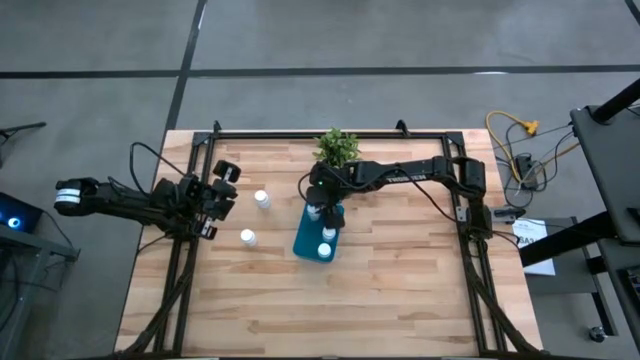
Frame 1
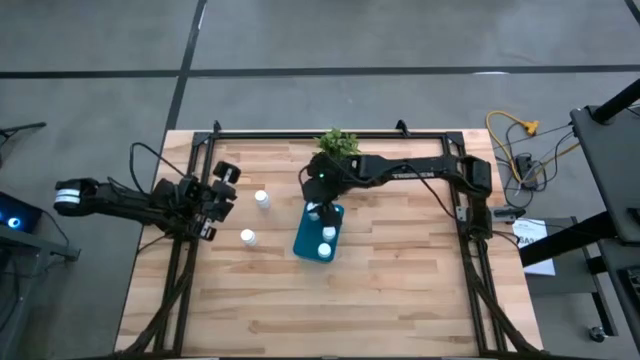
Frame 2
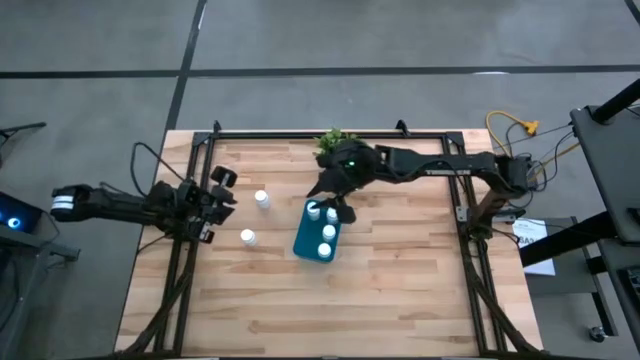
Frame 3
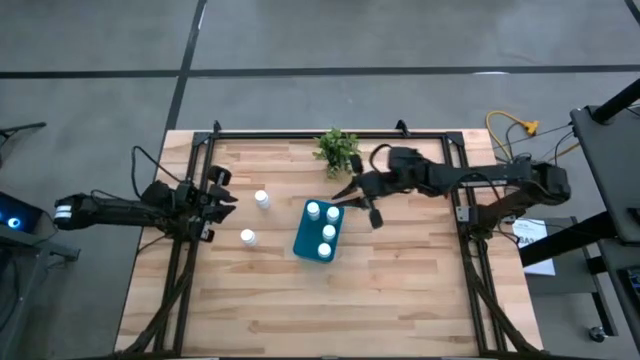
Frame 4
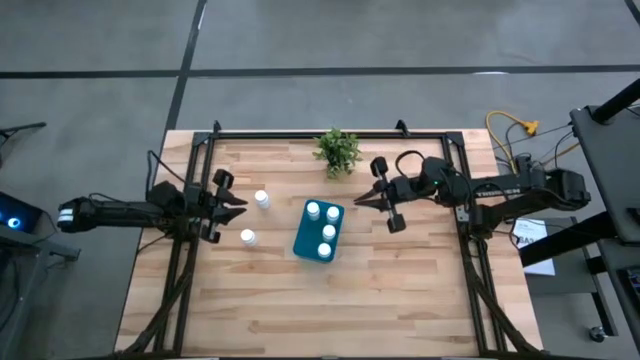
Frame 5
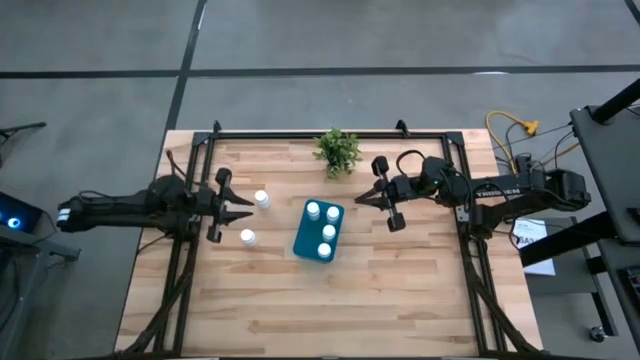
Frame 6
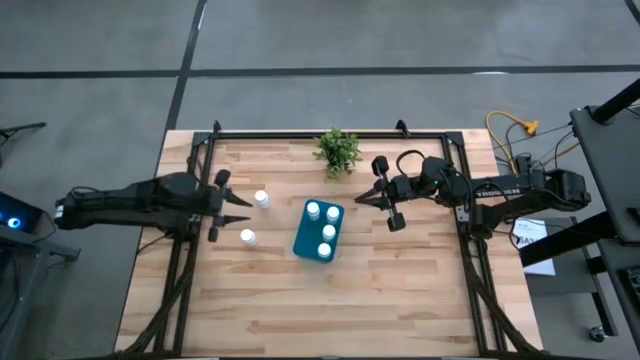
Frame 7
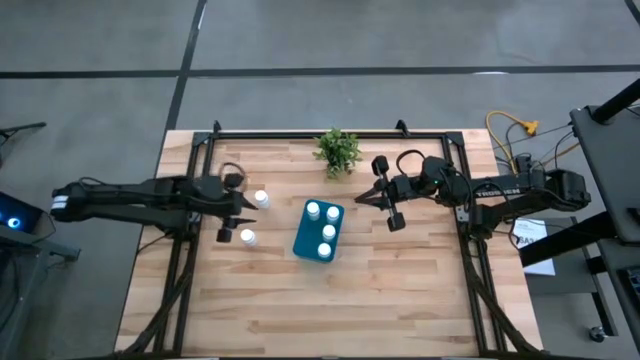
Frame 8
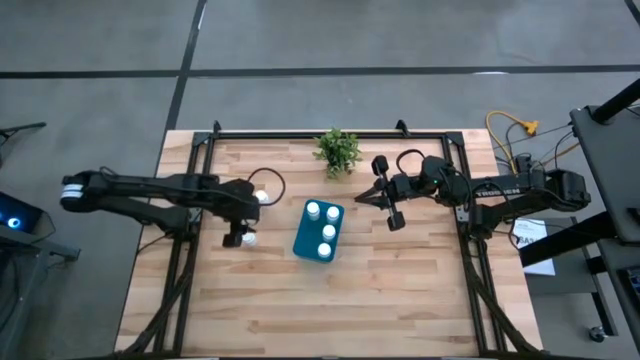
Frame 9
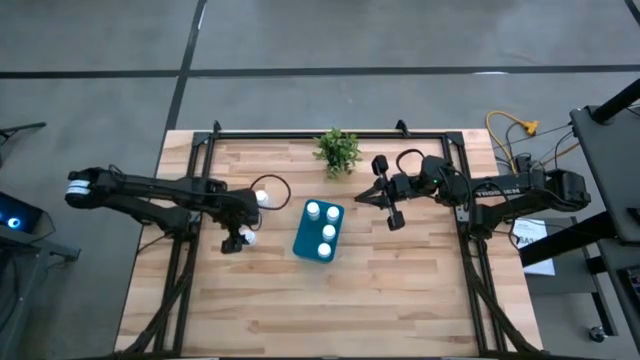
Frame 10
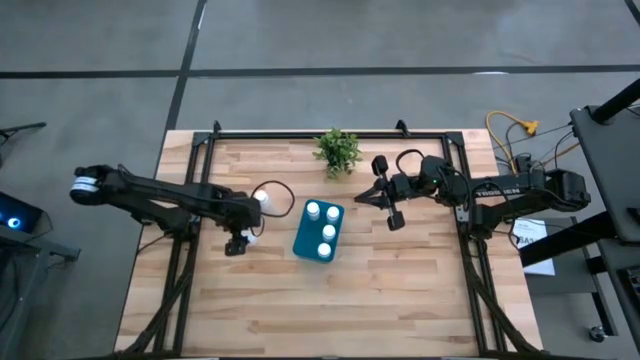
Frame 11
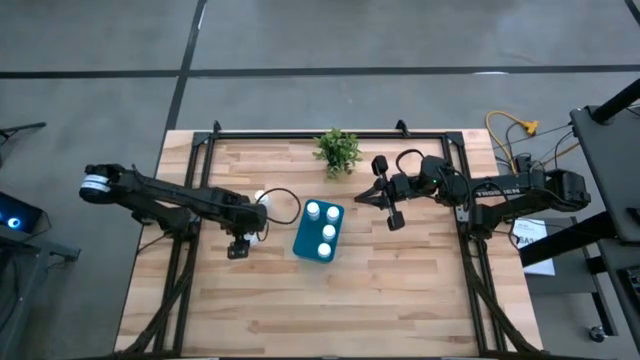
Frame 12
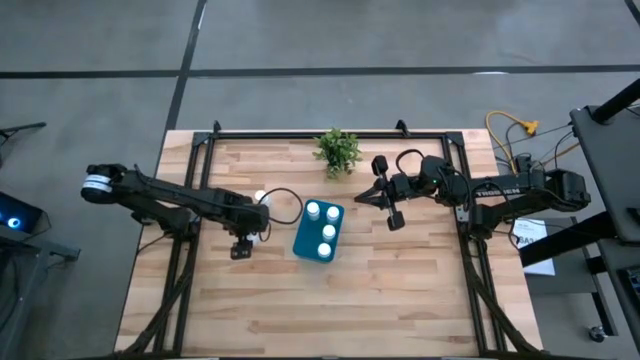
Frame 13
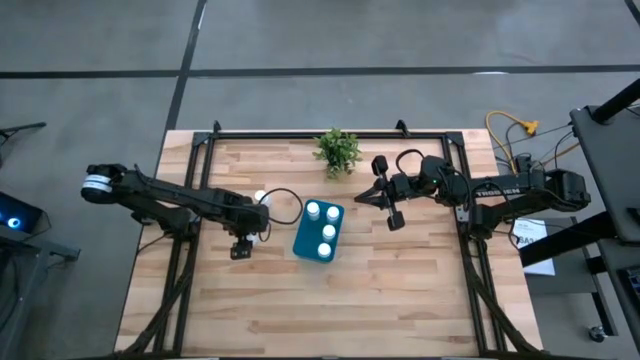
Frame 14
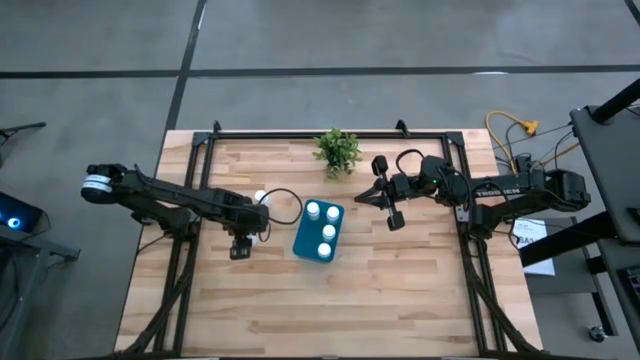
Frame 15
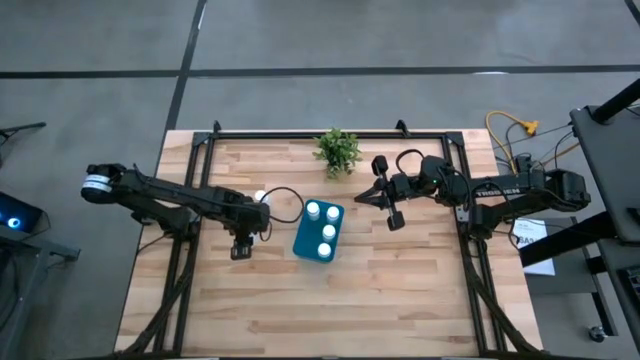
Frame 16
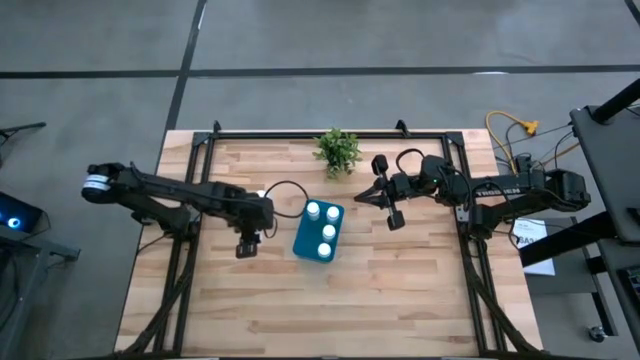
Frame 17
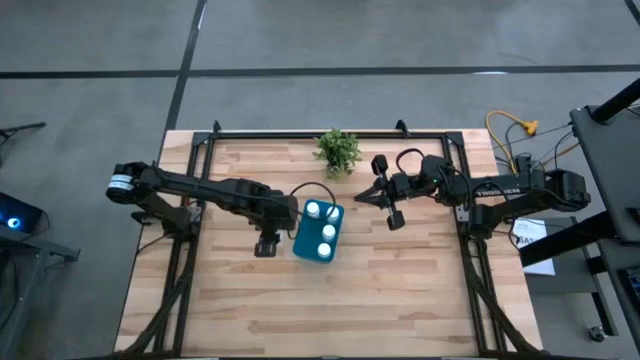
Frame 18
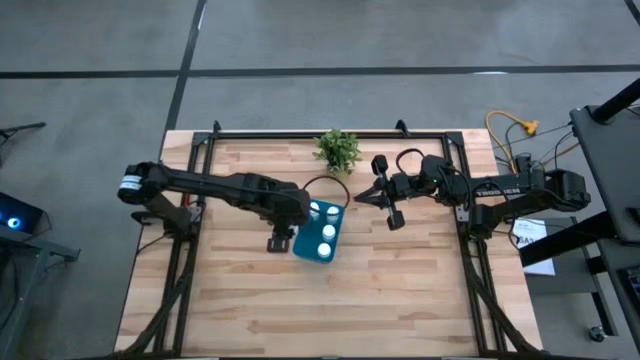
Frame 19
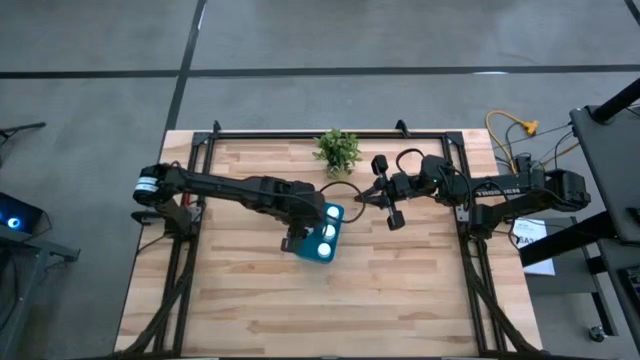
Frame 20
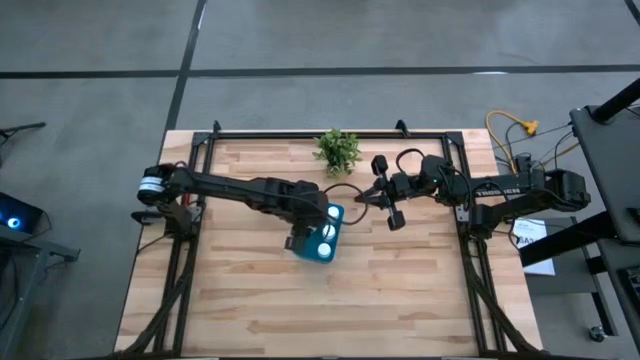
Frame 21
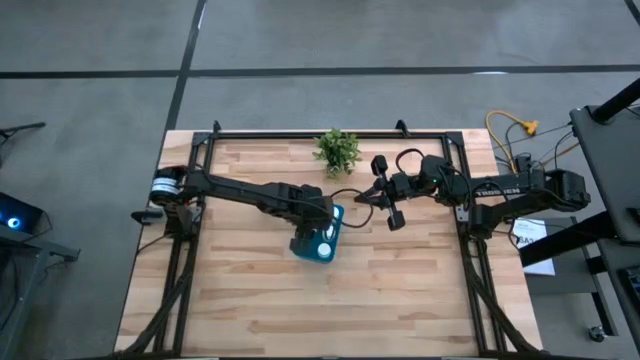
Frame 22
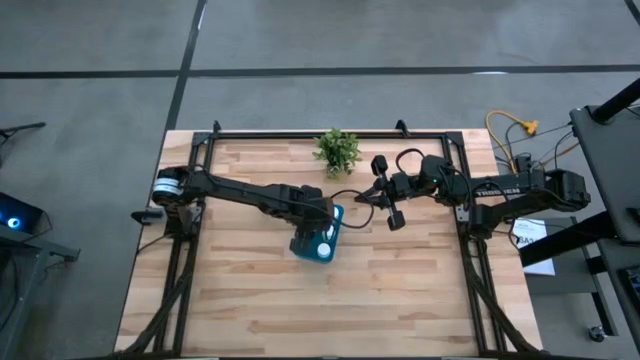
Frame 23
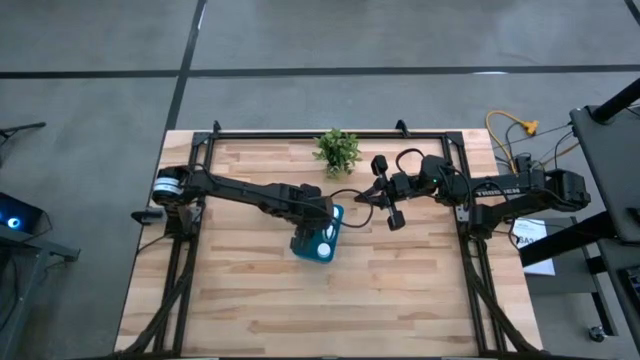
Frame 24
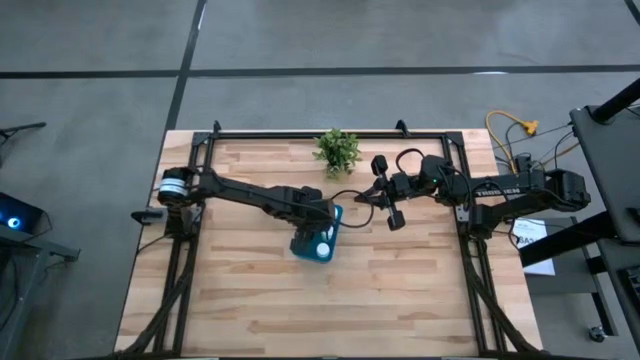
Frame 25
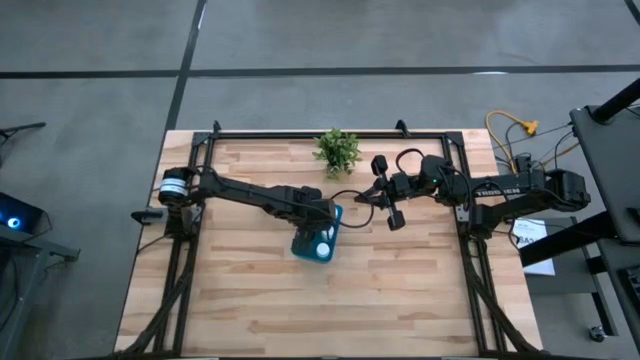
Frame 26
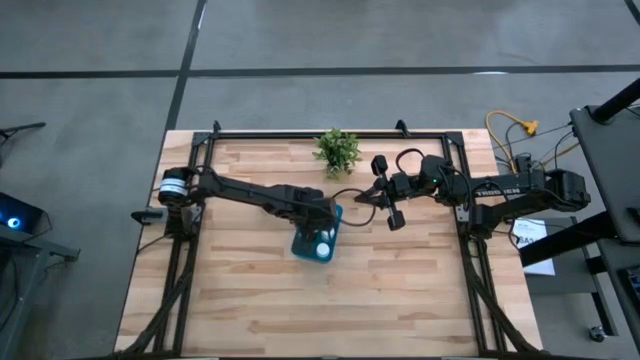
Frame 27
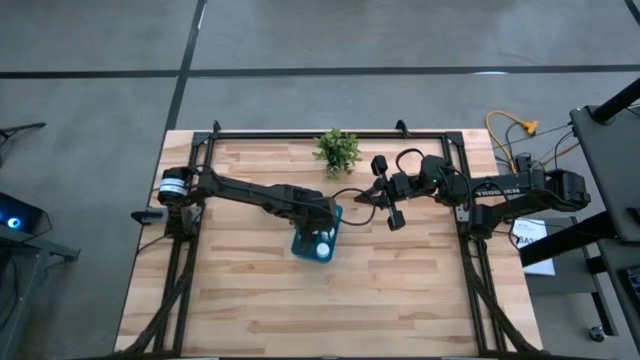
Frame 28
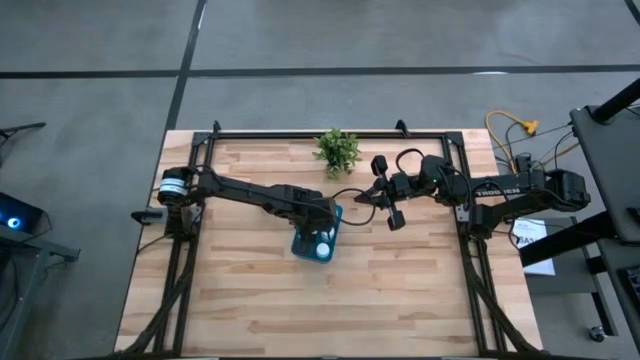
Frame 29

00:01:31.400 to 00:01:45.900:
Task: Pick and place pill bottles into a basket
Put the white medicine bottle into the blue bin

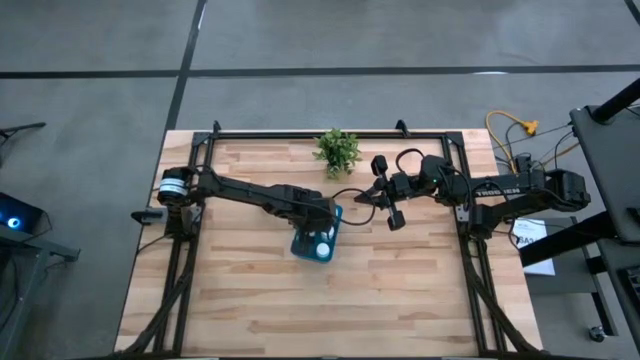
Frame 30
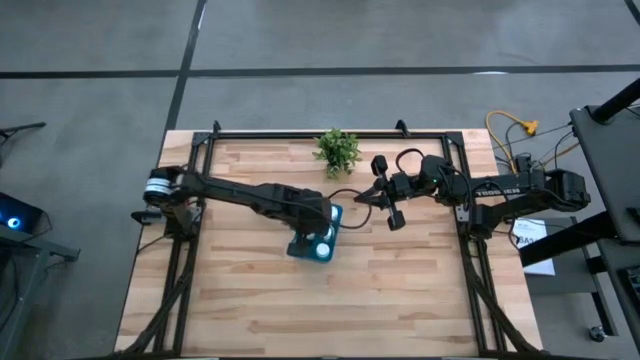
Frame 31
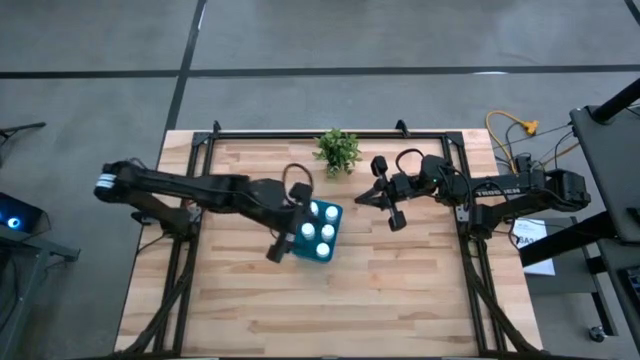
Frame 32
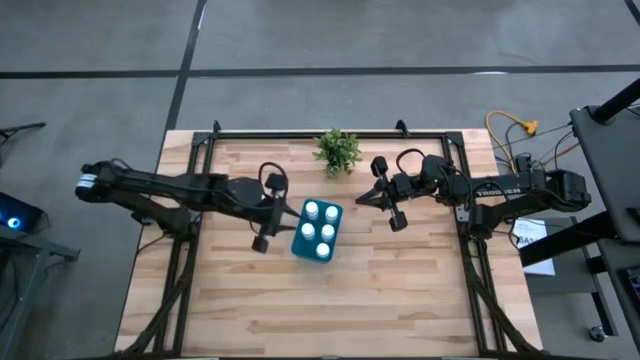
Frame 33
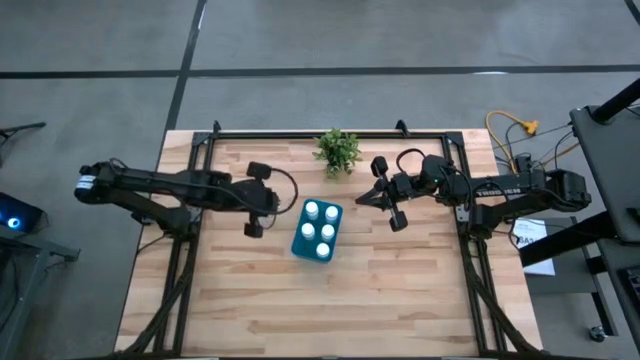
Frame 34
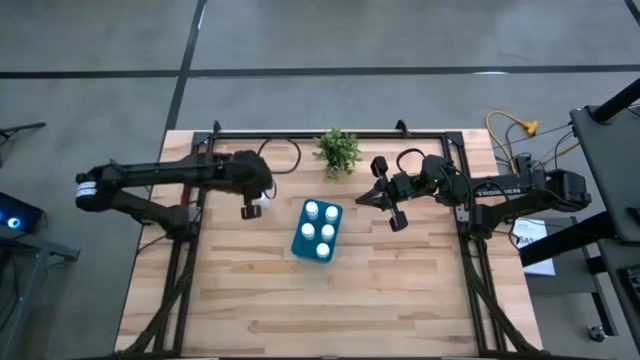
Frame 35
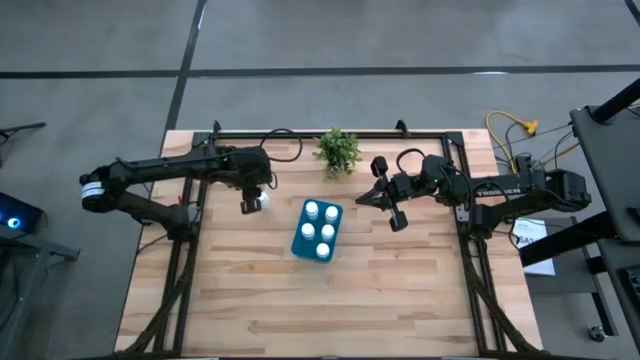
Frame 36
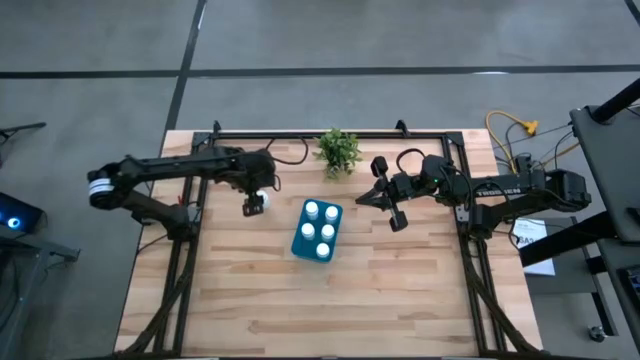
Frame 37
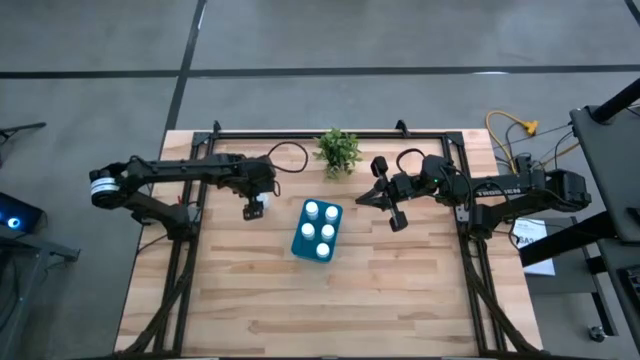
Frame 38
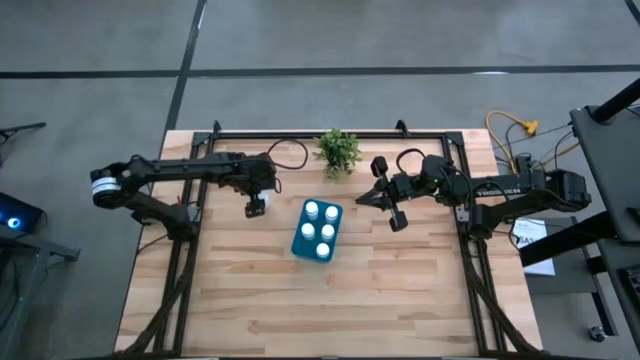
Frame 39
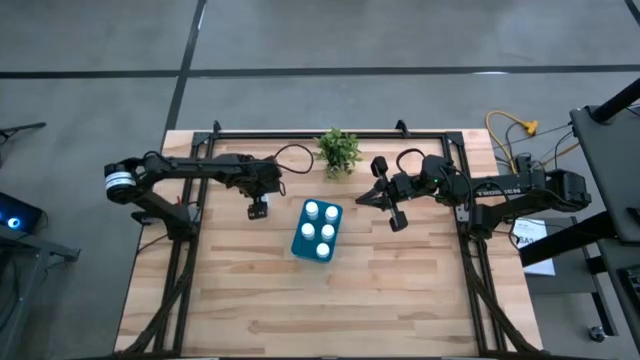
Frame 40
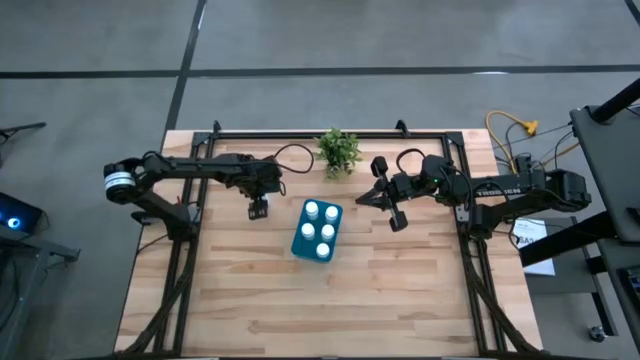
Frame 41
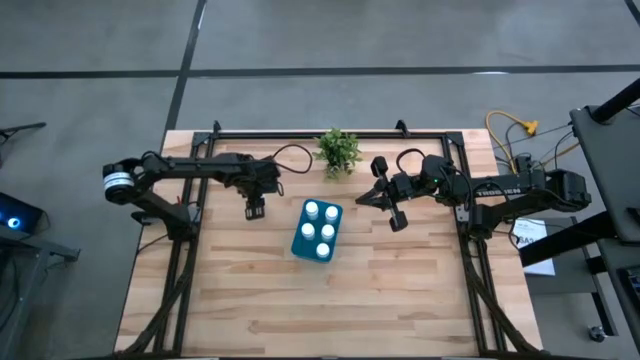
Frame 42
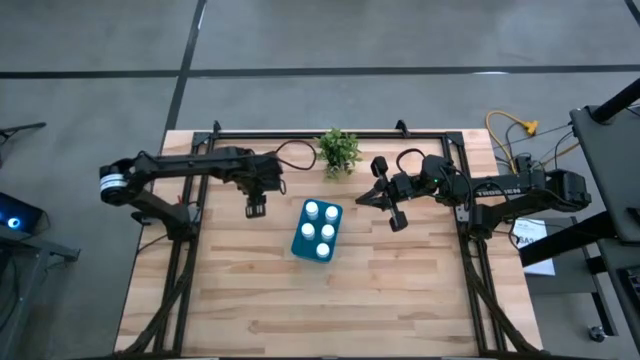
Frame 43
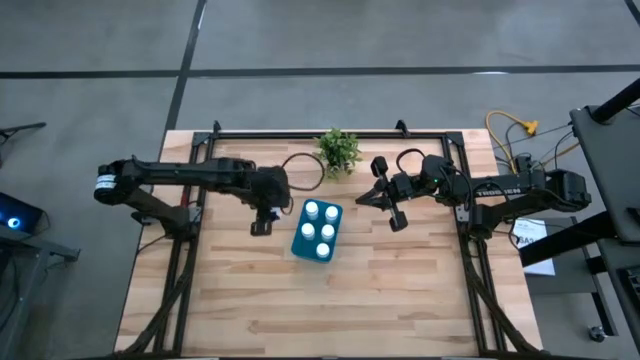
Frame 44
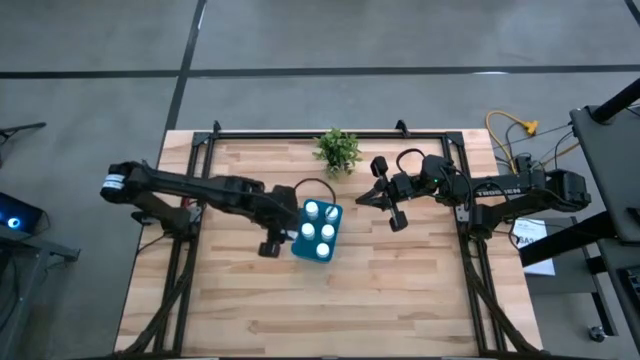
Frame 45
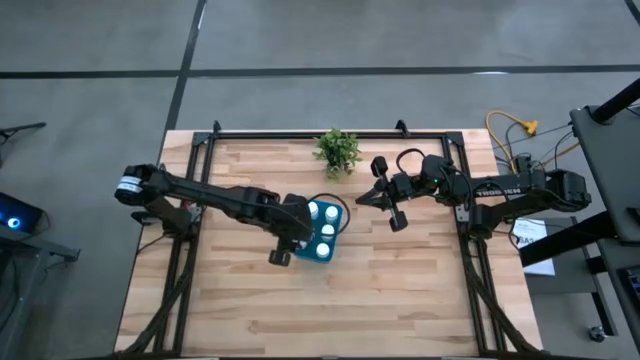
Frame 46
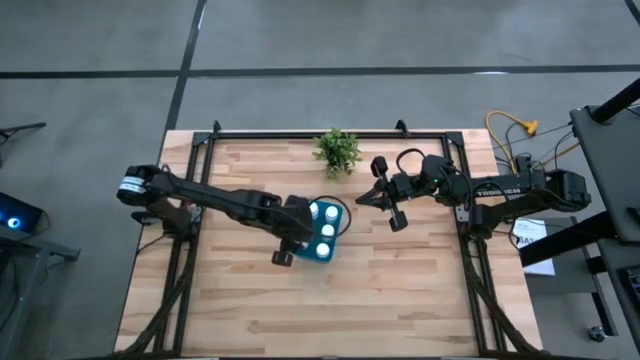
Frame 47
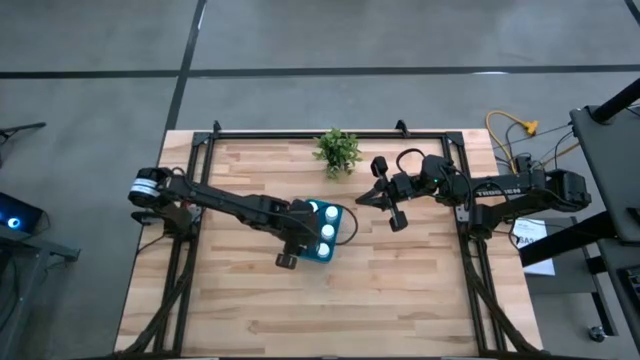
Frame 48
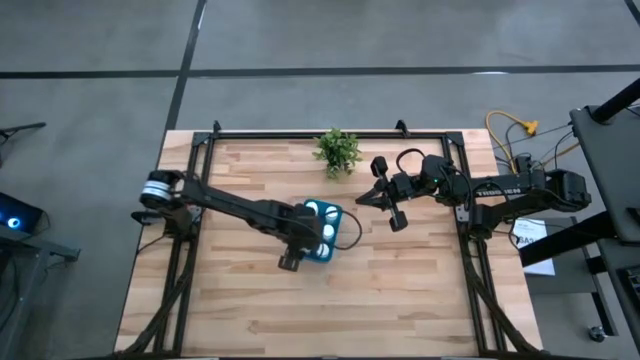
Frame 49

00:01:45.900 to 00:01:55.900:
Put the white medicine bottle into the blue bin
